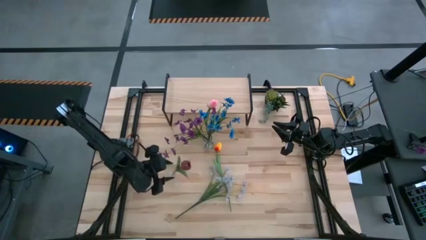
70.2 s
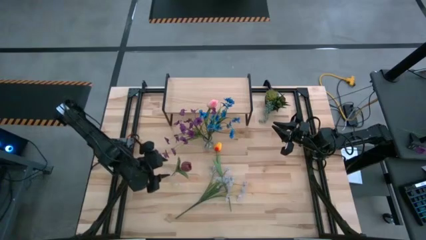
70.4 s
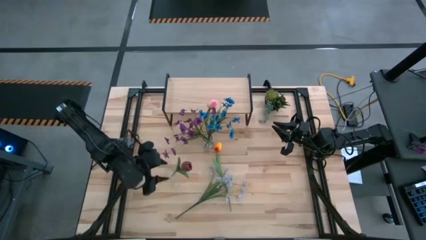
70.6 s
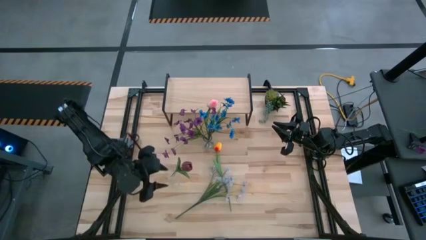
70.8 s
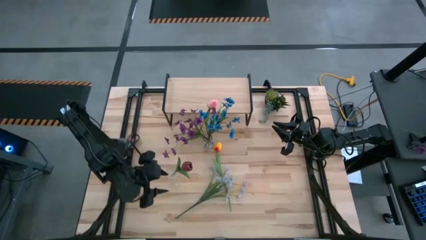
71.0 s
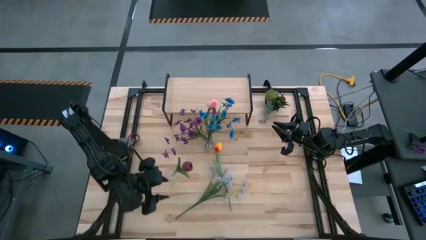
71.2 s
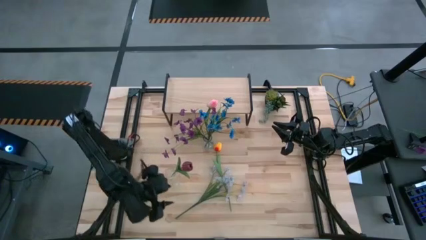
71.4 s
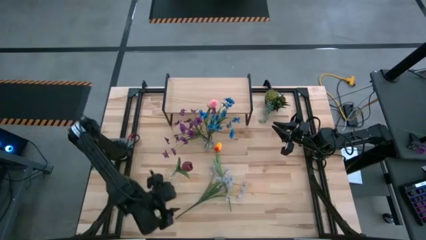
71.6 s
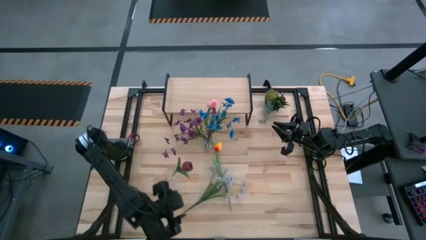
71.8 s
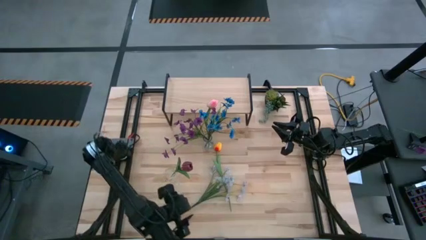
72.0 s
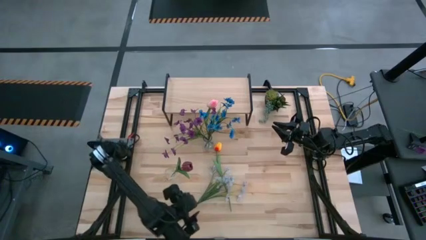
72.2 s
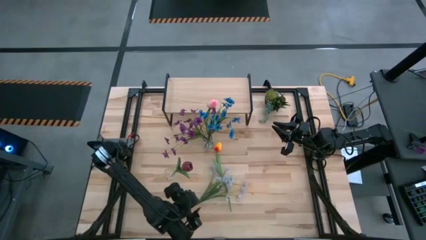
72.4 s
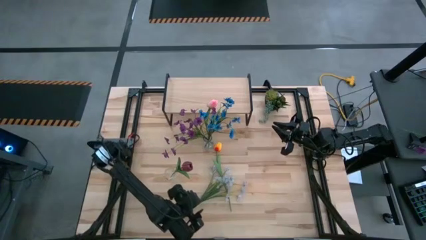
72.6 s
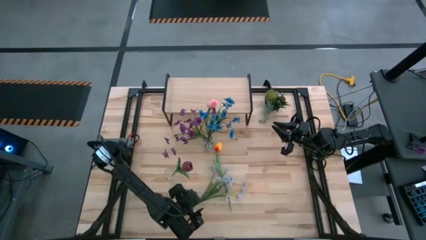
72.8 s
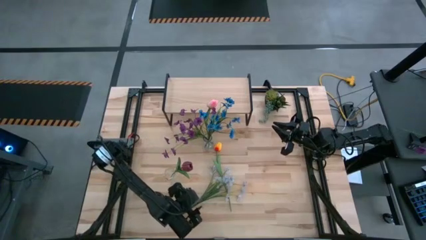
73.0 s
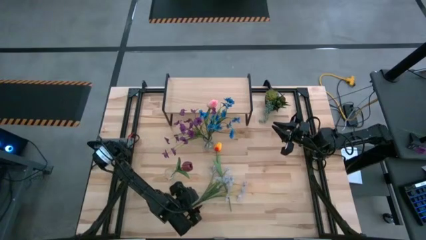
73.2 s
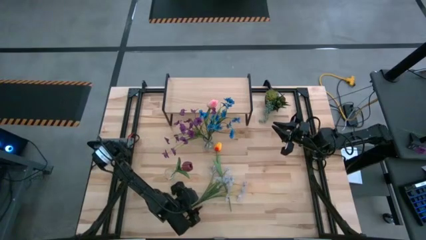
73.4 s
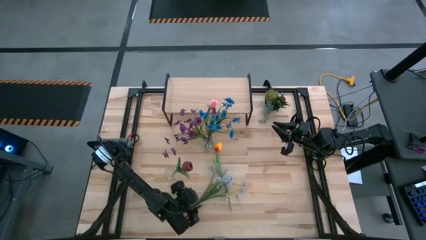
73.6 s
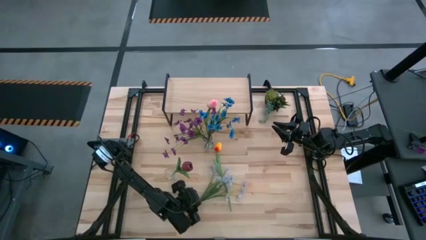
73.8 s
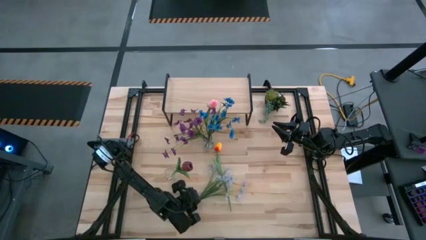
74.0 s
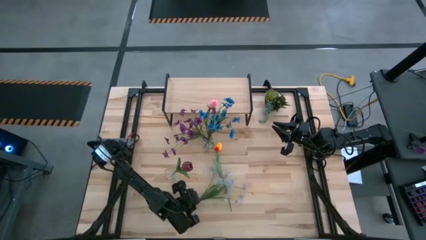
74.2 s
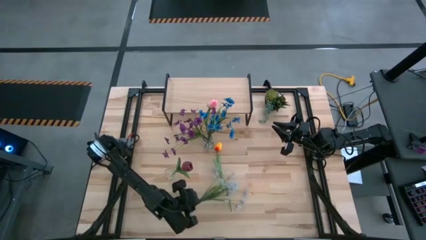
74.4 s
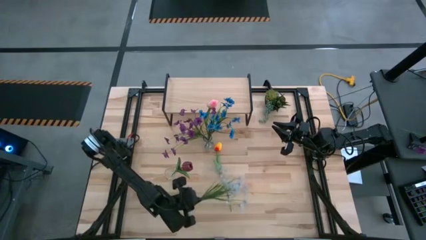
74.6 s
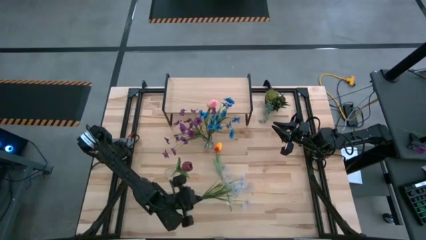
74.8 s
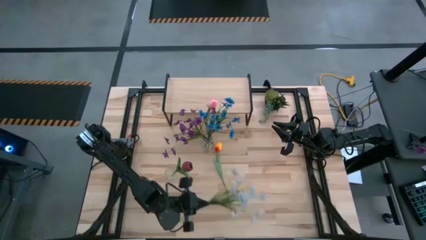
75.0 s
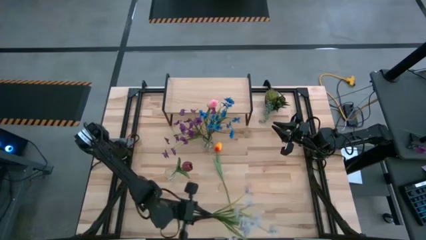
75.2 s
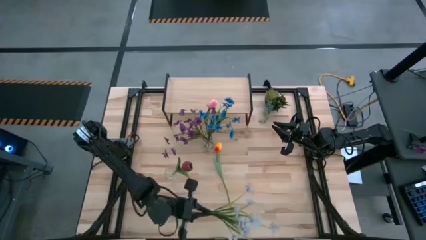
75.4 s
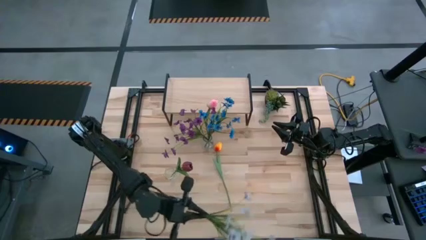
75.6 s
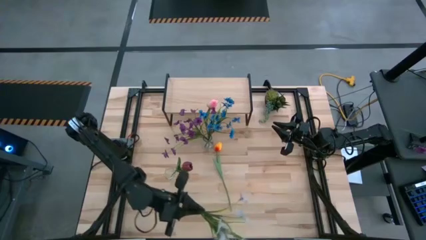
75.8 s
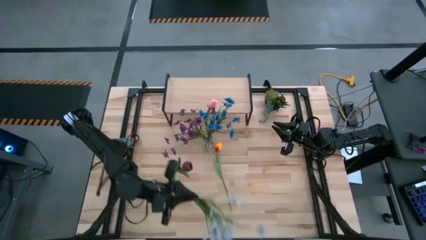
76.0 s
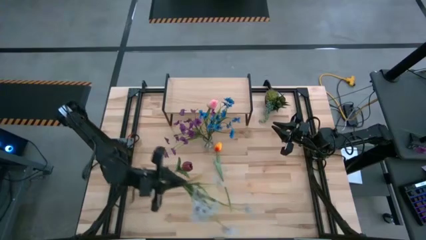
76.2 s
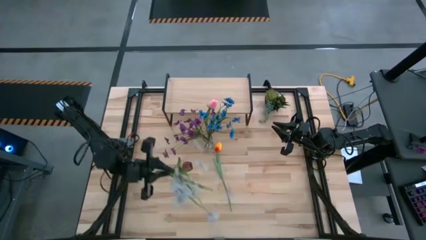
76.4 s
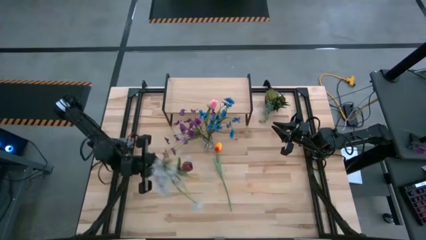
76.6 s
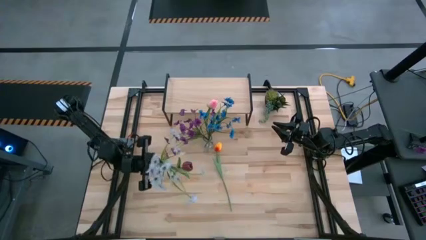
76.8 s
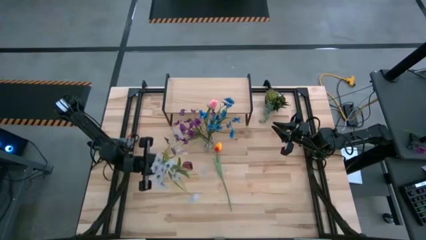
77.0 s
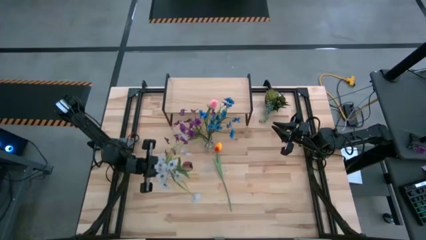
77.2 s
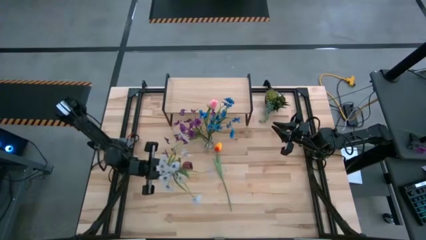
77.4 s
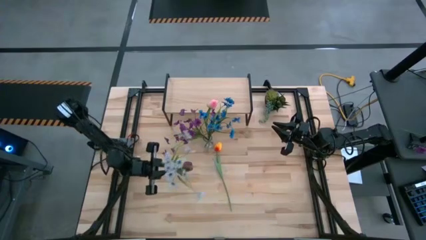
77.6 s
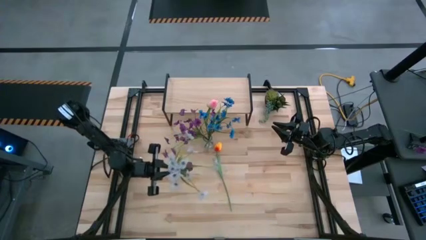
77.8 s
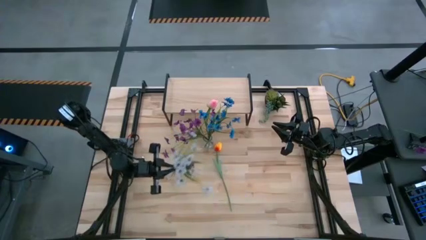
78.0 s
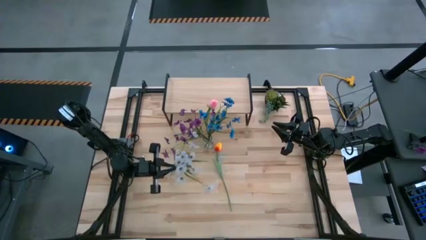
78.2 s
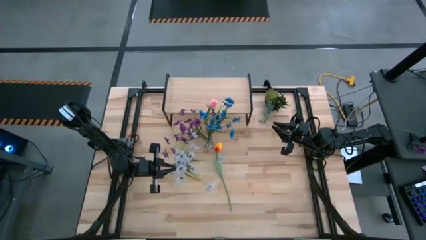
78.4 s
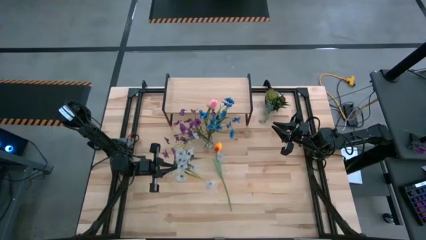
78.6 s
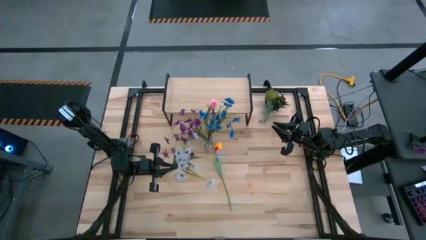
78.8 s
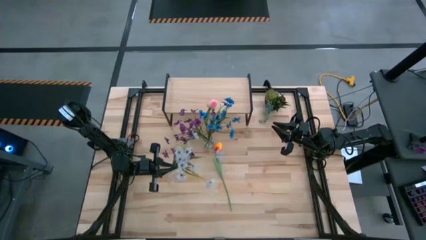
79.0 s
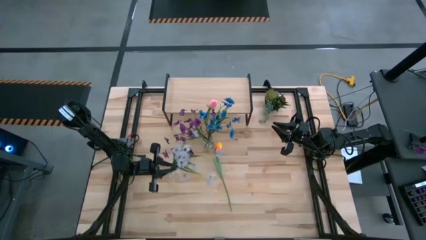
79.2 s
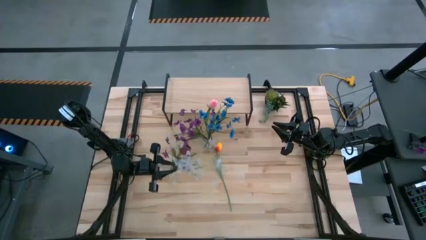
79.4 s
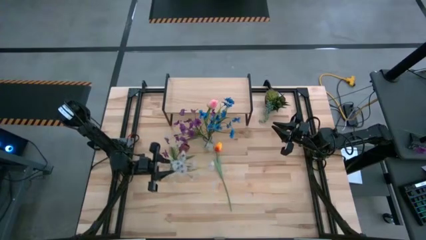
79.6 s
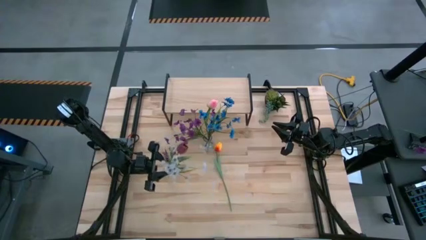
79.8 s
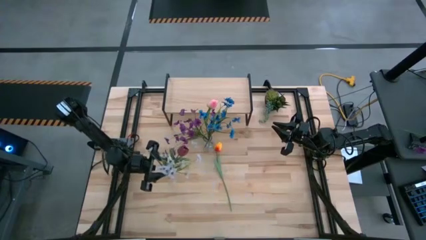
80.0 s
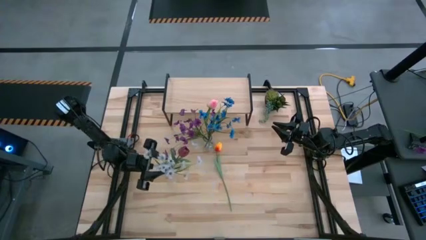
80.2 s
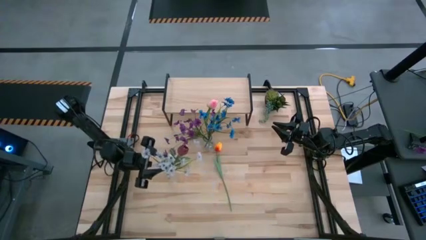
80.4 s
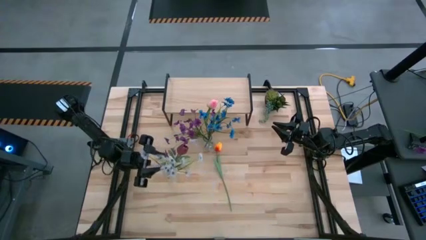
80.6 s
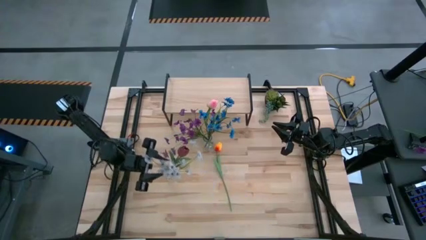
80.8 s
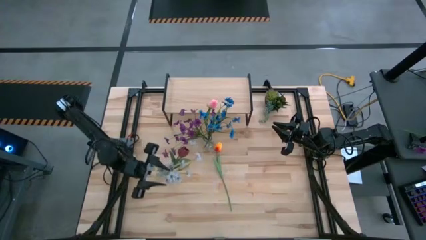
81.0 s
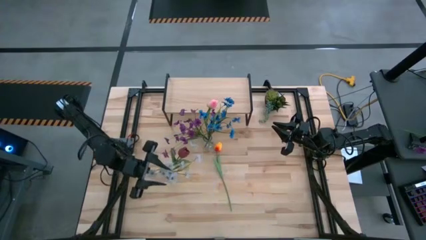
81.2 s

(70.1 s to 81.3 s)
Task: Pick and place flowers into a vace then onto a shelf
Put the white flower into the left transparent vase

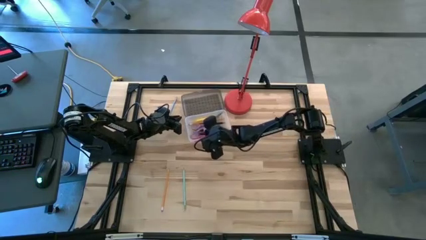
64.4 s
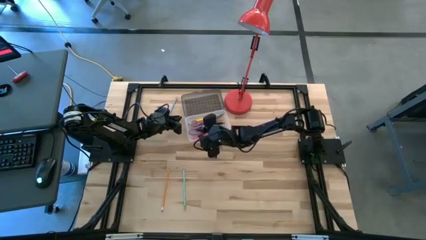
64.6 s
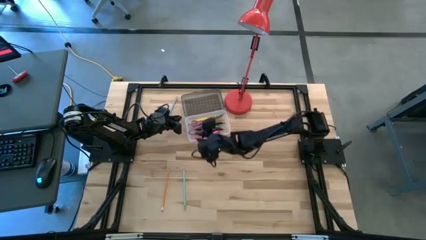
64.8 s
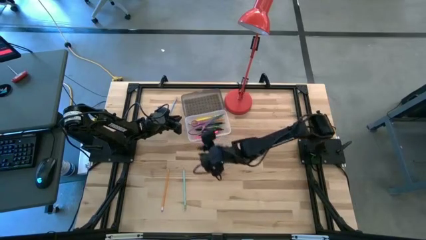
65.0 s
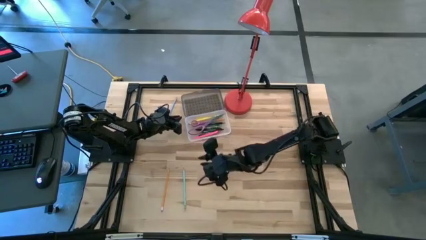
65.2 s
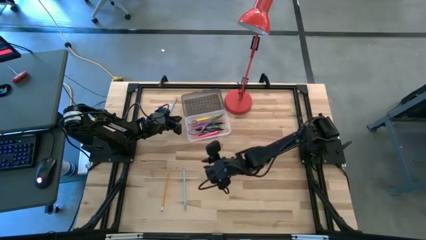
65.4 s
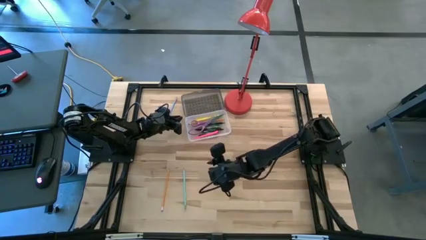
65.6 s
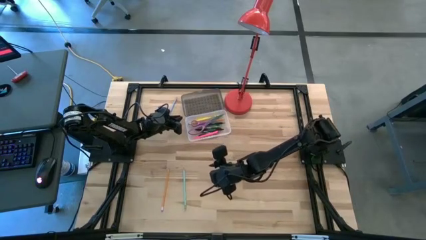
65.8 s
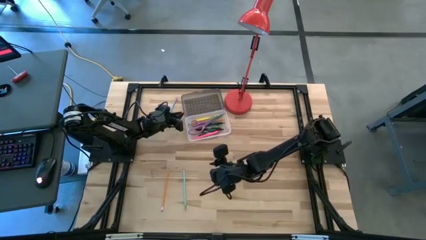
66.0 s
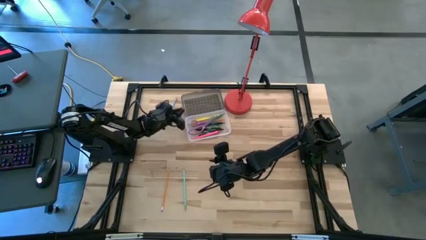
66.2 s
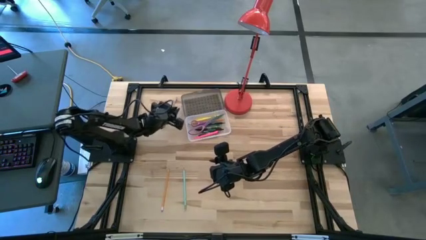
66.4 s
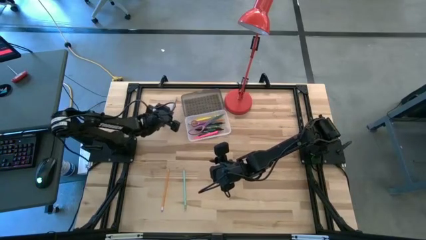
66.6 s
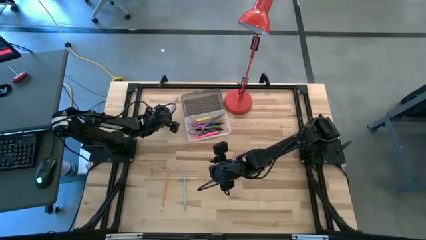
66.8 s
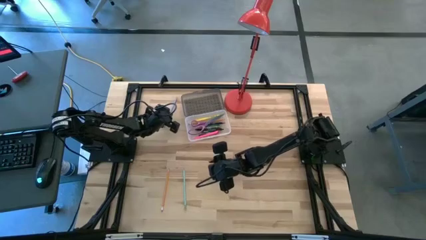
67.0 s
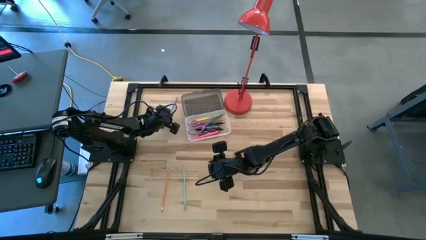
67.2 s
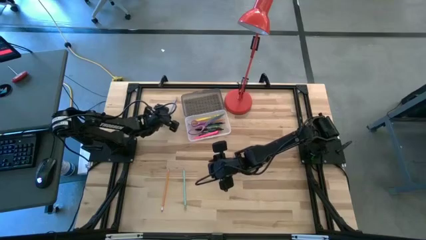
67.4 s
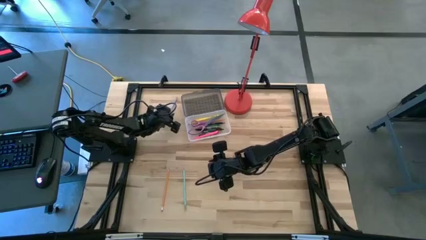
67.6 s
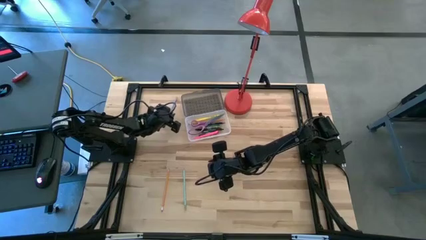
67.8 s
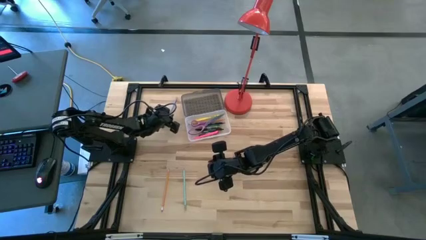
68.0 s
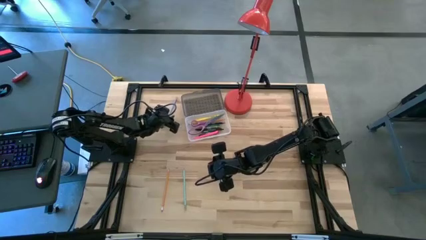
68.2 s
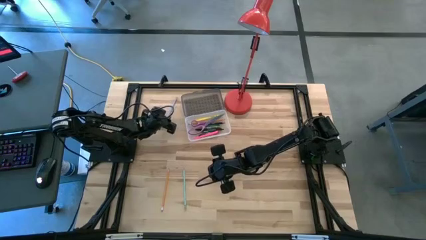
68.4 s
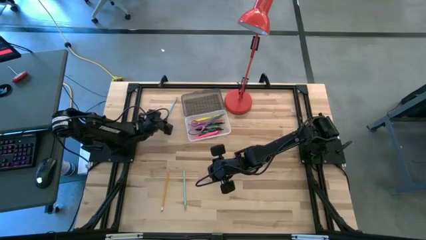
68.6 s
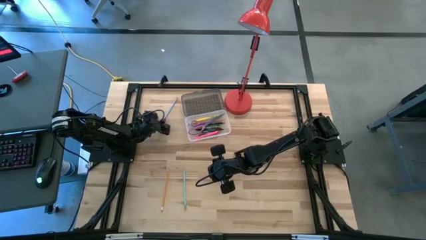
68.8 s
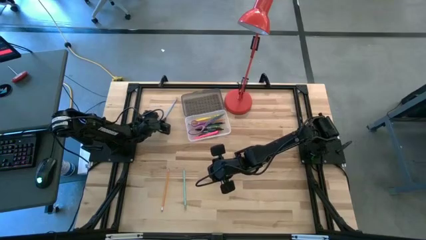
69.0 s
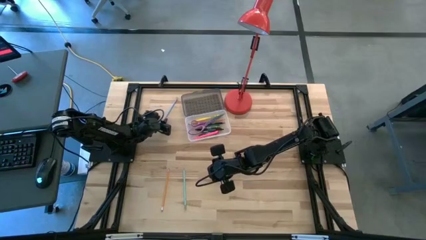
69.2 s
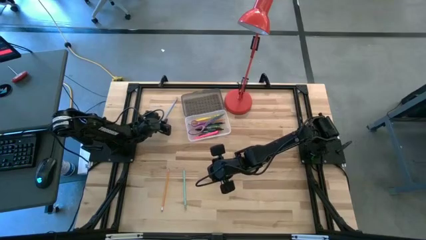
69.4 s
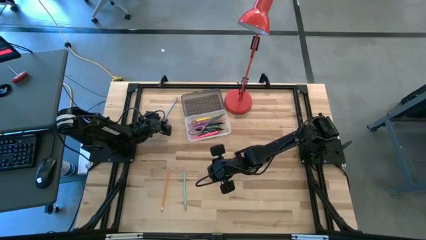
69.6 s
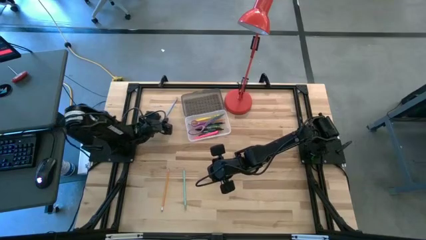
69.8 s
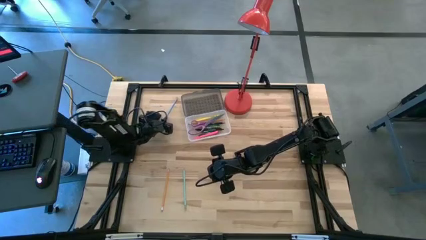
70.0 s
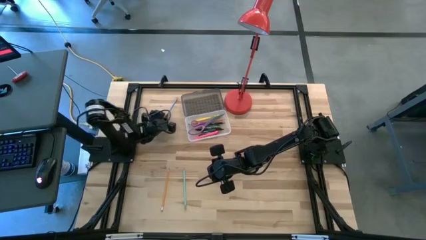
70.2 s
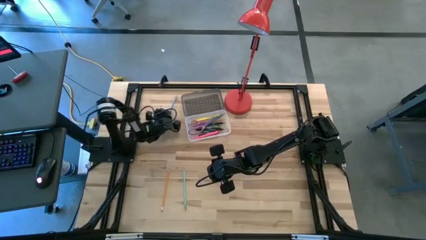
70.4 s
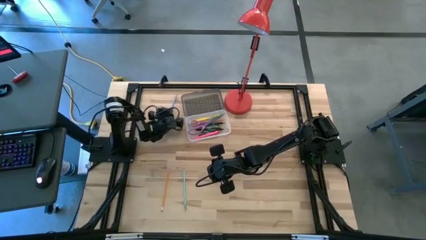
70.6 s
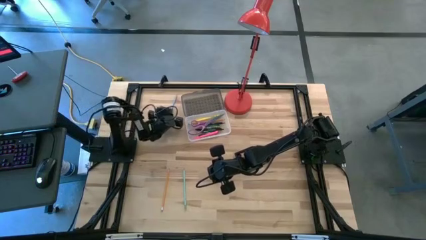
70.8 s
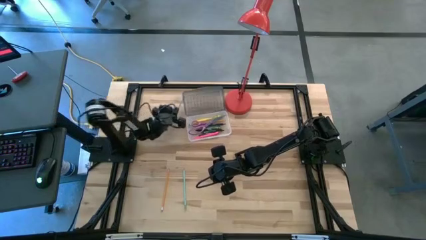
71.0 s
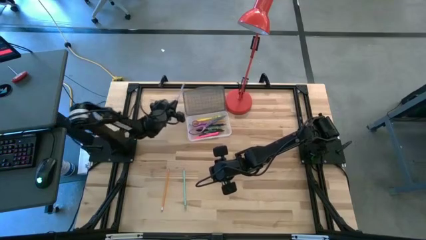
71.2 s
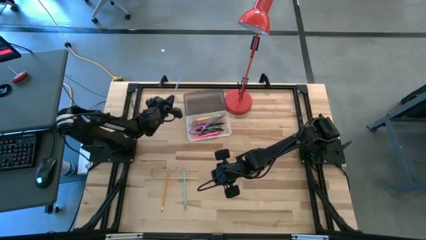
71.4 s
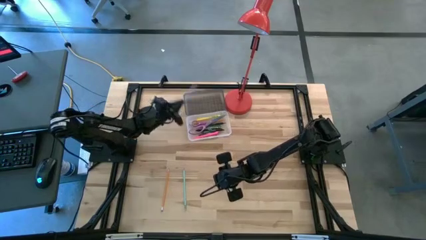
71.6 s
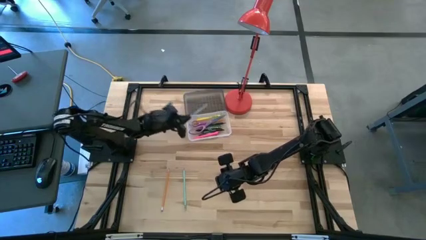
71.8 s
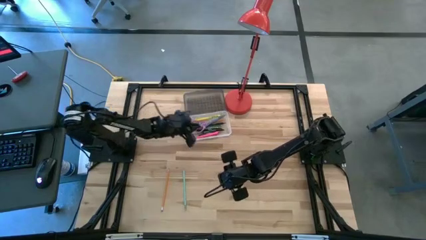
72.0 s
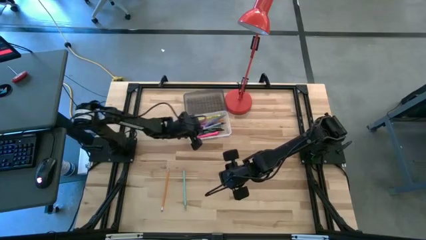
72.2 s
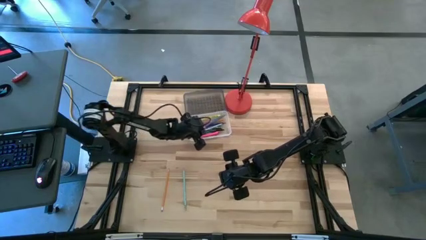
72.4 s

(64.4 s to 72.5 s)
Task: Pick & place school supplies into a supply box
Put the blue pencil into the black supply box
